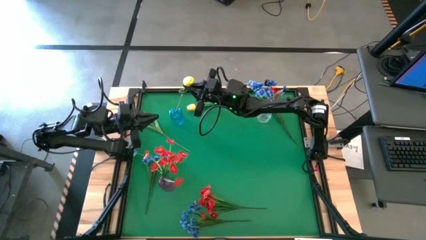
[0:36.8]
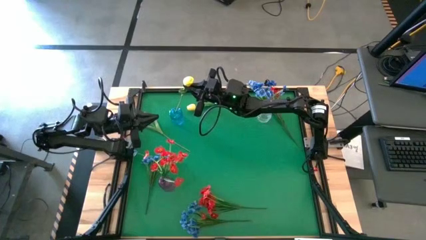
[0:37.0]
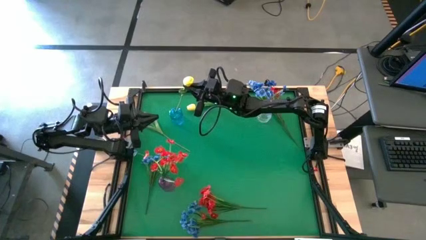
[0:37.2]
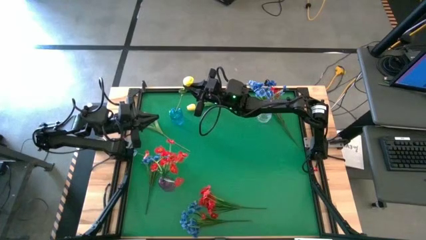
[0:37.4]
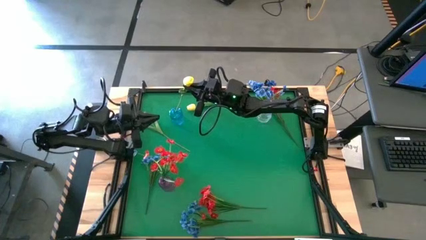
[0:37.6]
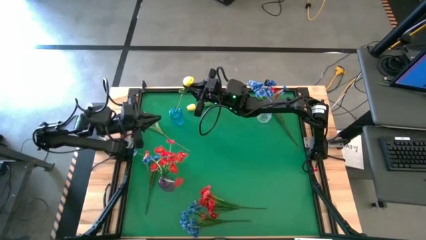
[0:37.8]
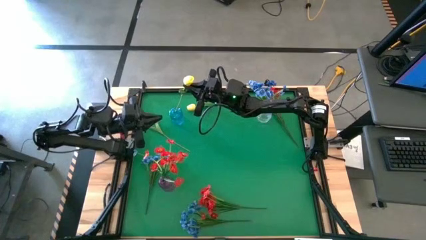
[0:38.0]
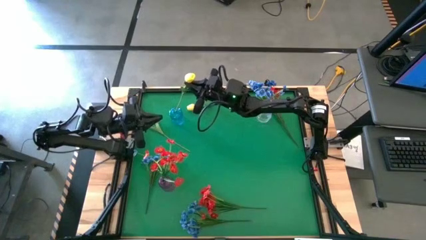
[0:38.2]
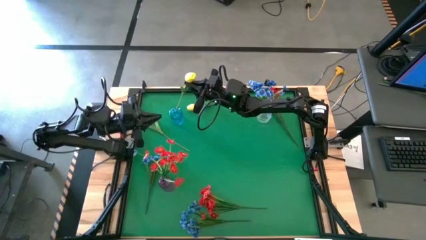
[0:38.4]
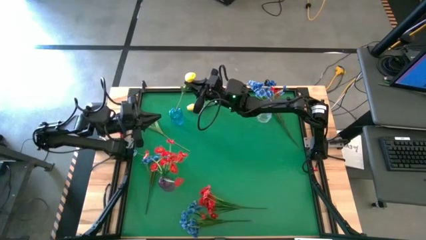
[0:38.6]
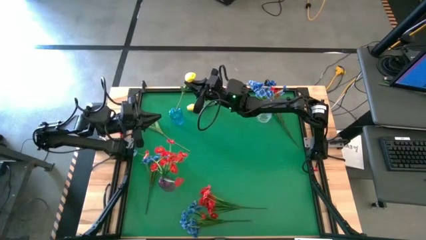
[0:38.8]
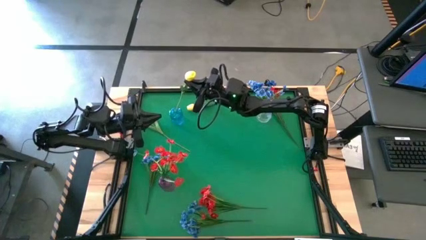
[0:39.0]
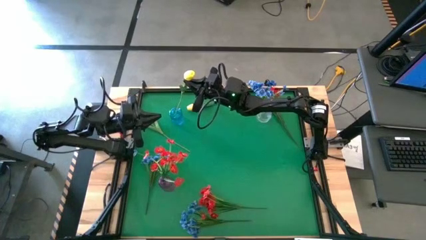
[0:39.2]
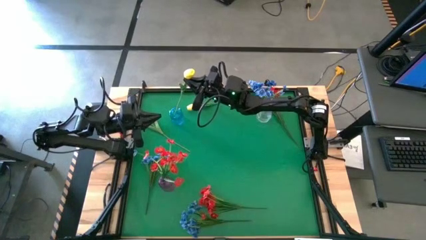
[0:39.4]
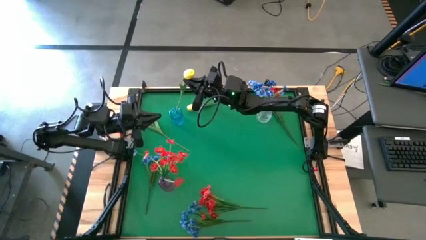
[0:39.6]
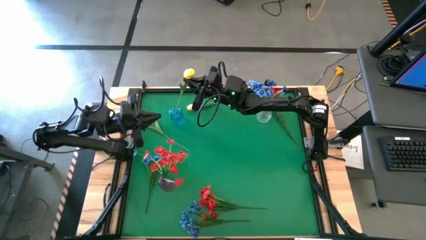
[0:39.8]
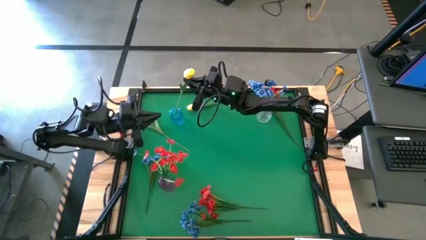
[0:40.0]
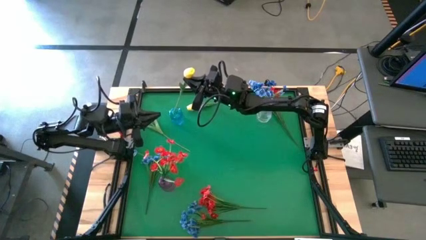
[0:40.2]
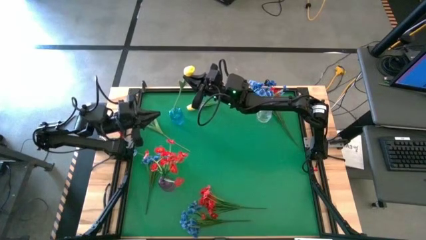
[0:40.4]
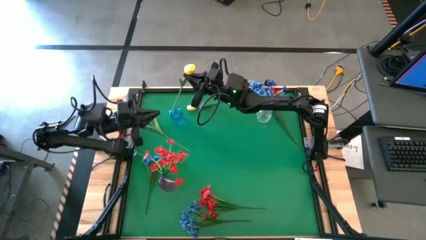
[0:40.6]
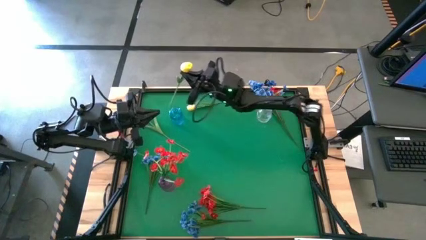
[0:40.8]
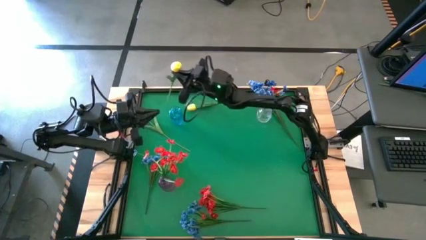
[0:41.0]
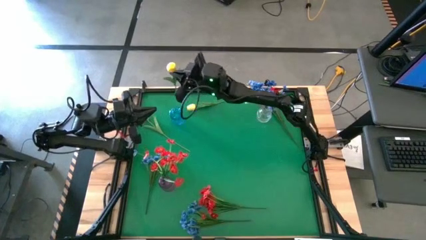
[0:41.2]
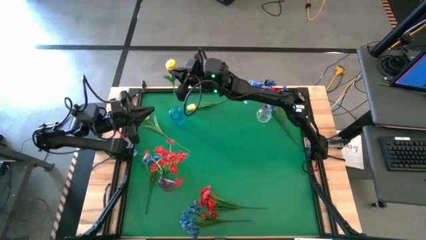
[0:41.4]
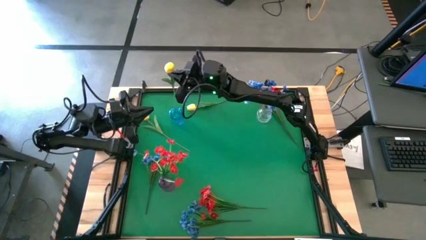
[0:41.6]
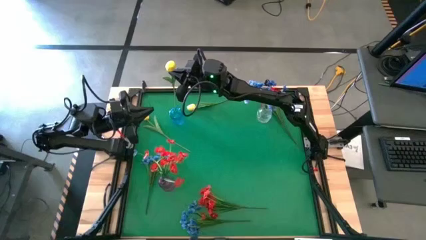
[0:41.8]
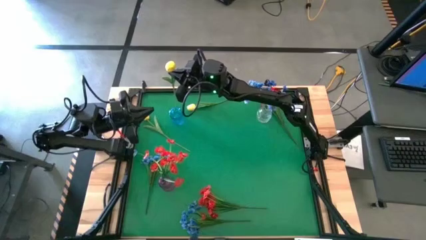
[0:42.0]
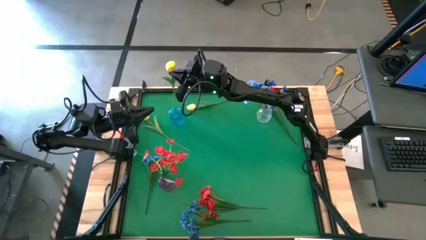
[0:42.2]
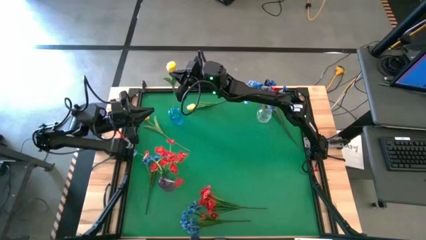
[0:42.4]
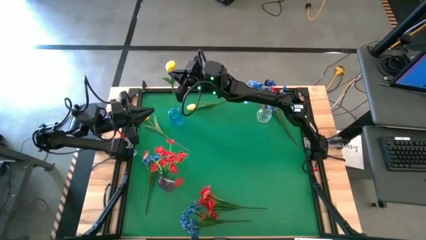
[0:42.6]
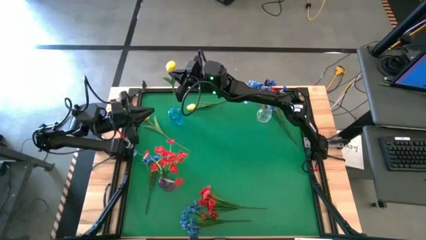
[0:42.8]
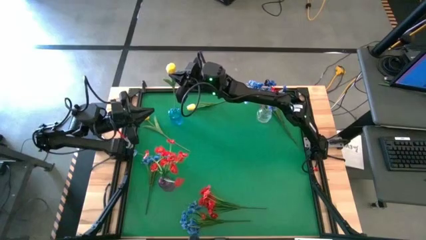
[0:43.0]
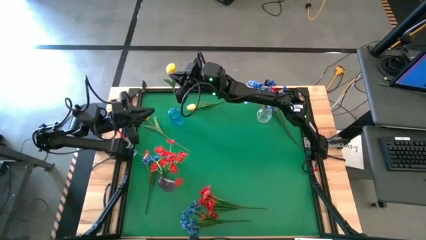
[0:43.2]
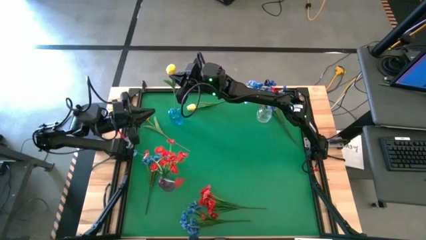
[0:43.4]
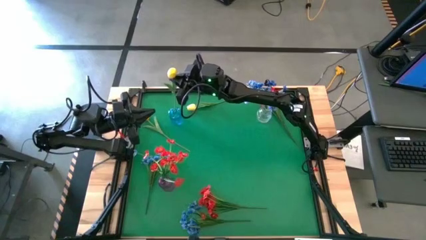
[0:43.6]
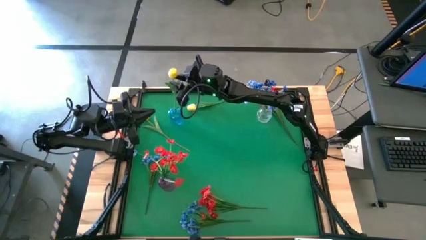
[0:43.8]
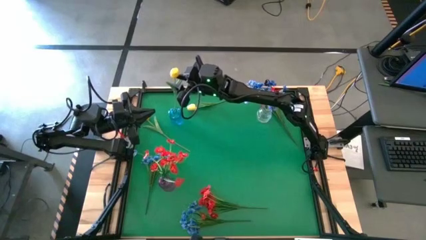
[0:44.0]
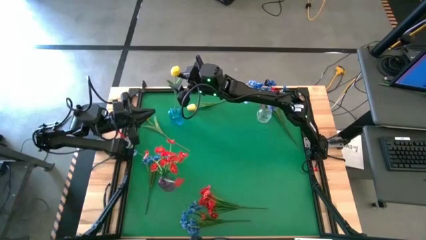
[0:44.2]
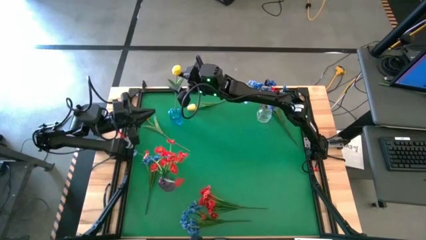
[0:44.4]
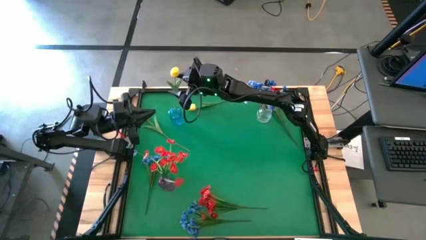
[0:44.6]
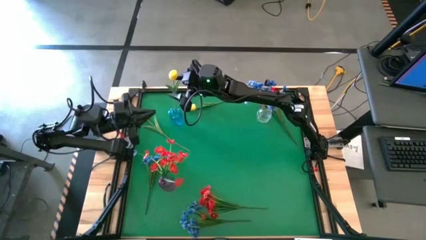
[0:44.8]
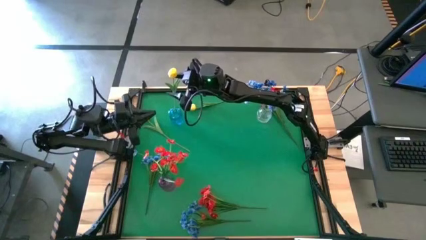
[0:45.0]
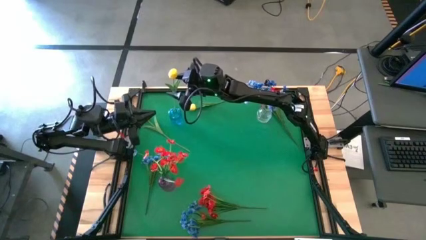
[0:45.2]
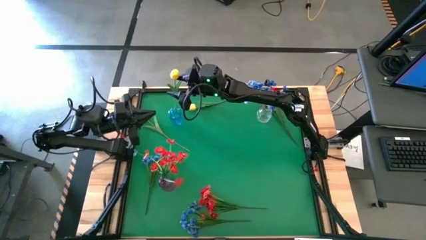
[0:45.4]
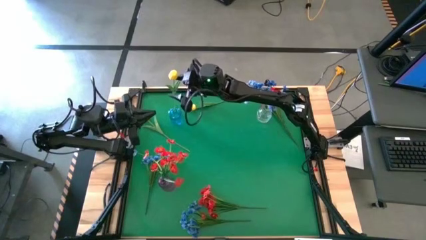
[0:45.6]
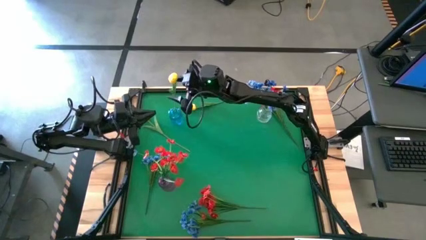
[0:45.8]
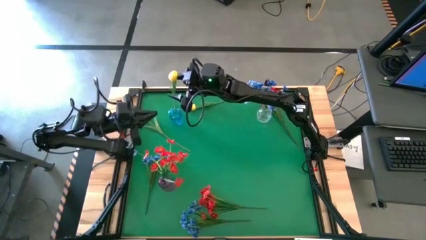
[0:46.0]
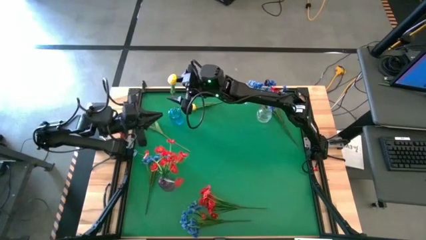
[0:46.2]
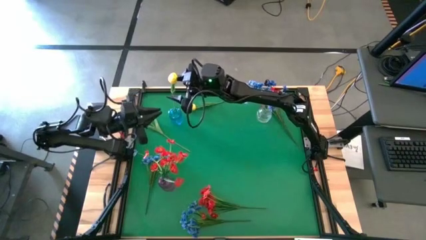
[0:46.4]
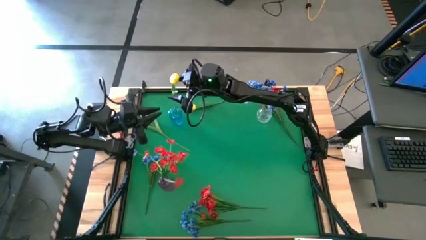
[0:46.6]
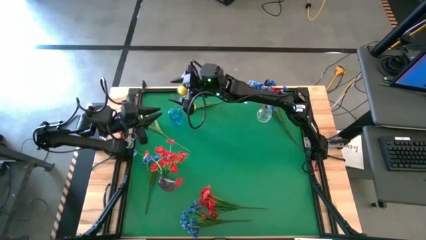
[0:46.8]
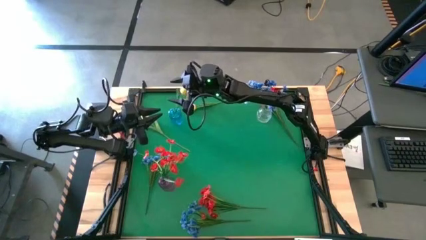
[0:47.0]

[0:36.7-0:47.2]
Task: Sort flowers into vase by color
Put the yellow tulip into the blue vase

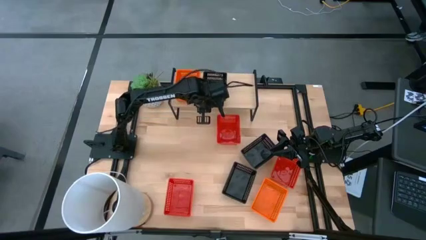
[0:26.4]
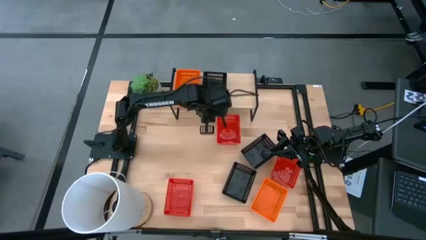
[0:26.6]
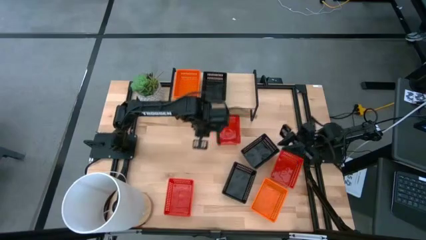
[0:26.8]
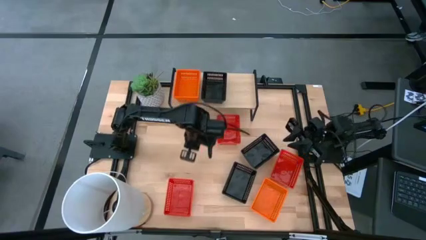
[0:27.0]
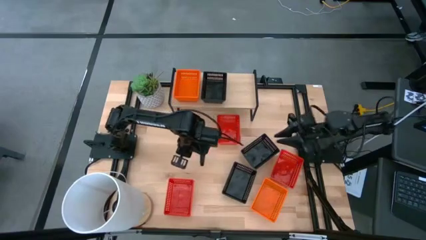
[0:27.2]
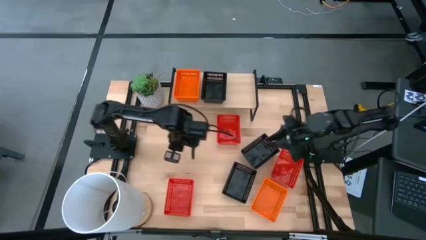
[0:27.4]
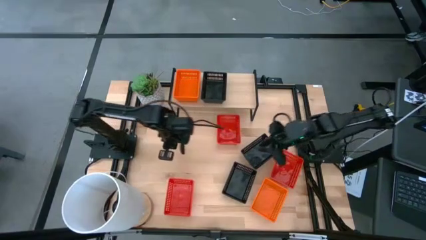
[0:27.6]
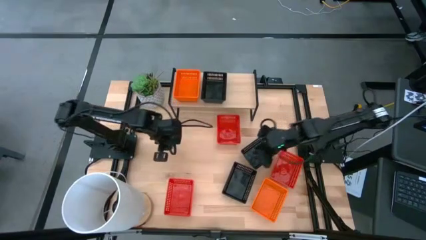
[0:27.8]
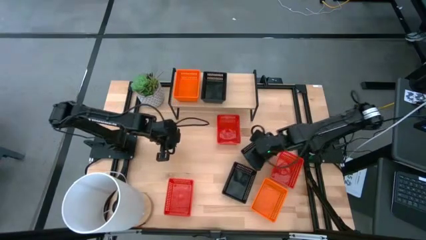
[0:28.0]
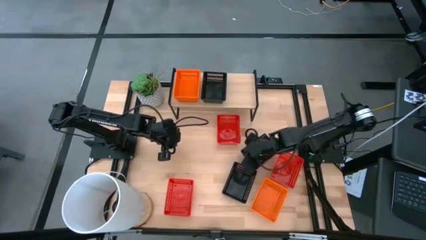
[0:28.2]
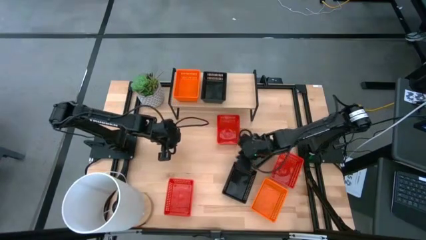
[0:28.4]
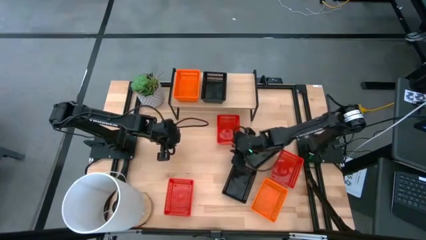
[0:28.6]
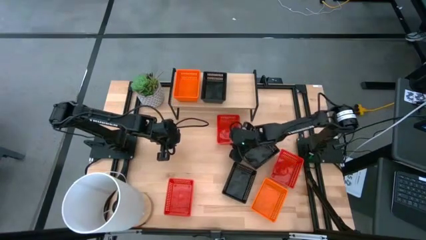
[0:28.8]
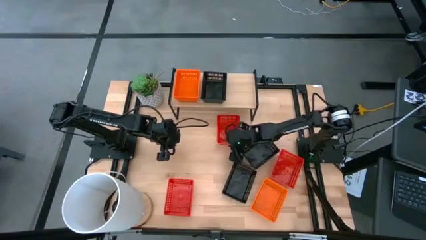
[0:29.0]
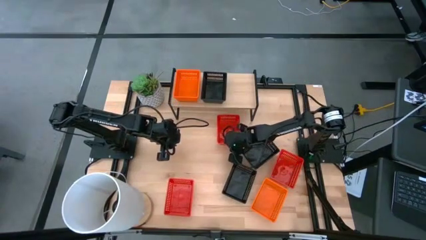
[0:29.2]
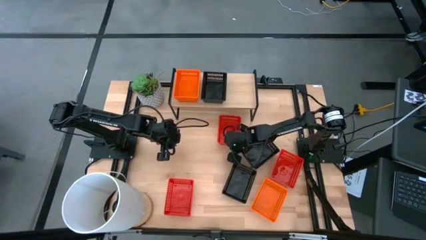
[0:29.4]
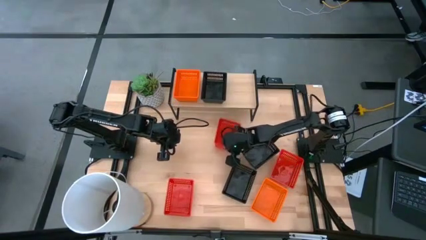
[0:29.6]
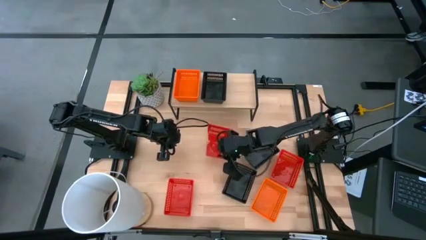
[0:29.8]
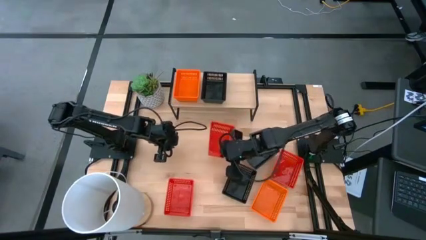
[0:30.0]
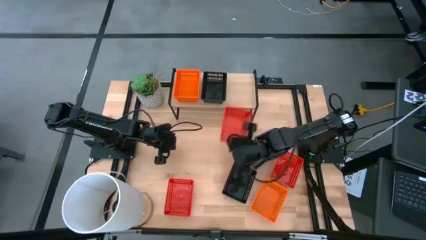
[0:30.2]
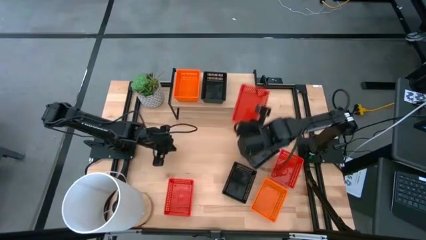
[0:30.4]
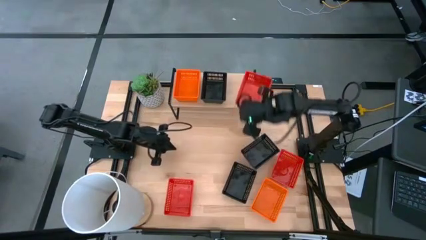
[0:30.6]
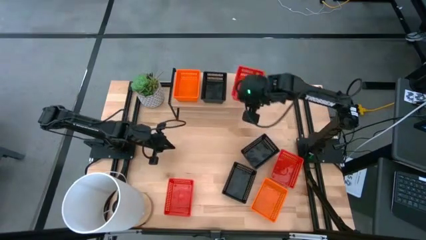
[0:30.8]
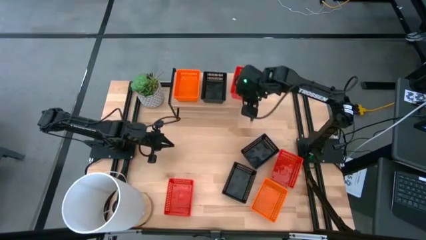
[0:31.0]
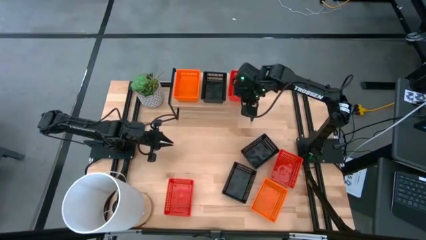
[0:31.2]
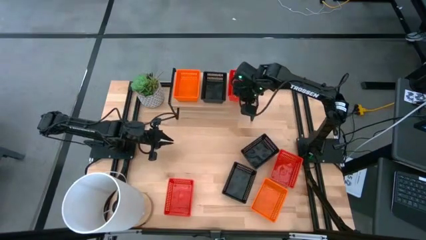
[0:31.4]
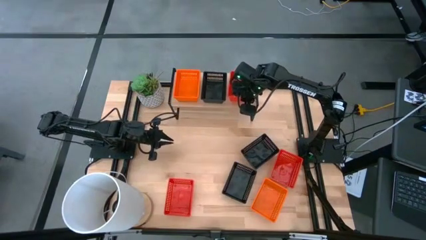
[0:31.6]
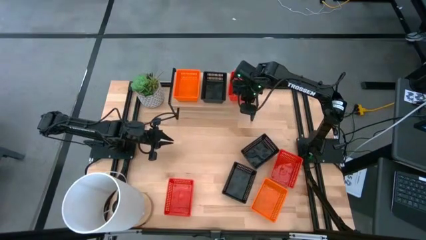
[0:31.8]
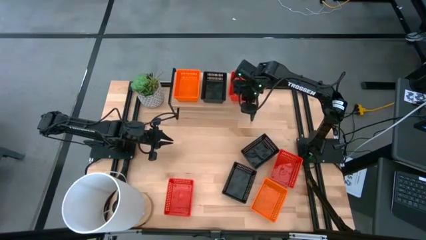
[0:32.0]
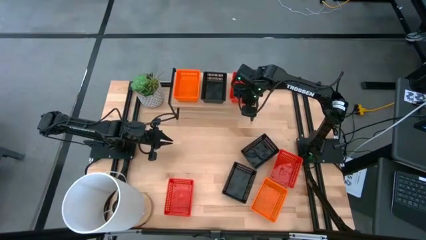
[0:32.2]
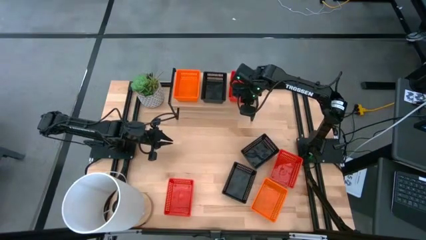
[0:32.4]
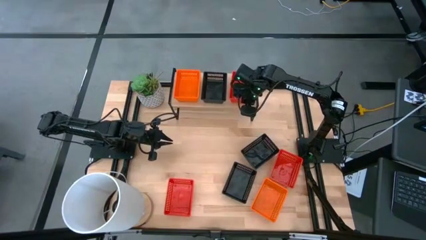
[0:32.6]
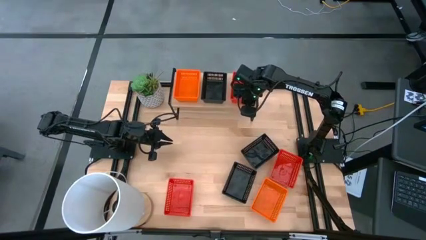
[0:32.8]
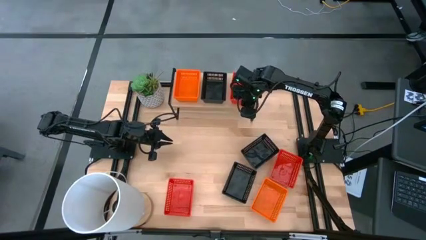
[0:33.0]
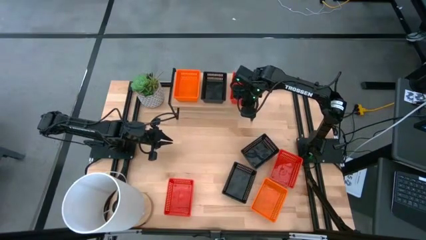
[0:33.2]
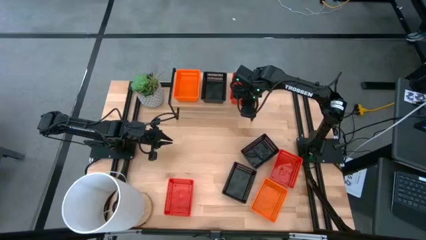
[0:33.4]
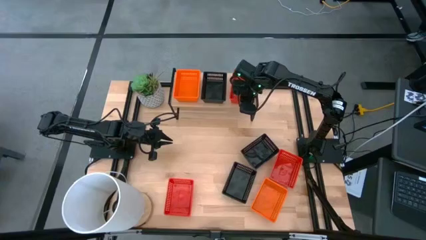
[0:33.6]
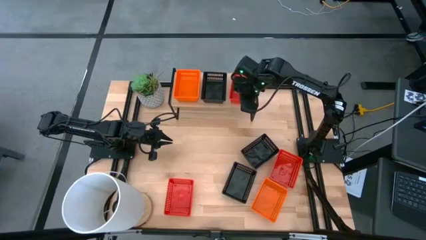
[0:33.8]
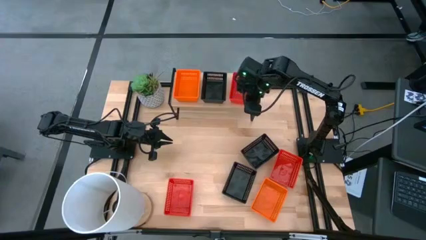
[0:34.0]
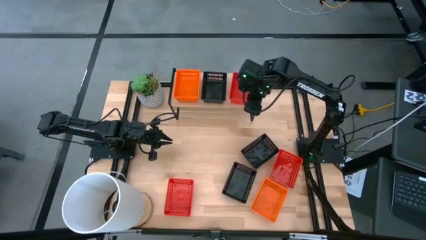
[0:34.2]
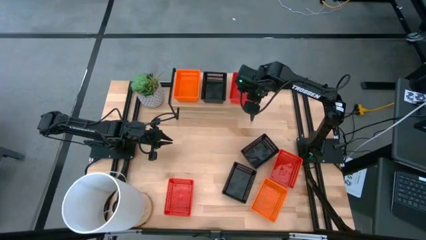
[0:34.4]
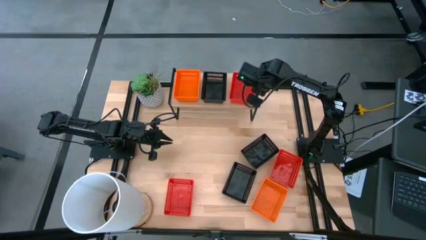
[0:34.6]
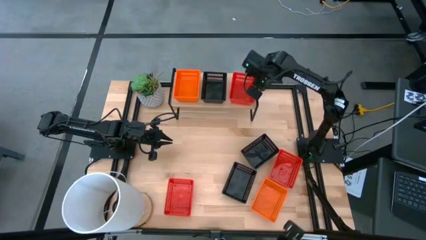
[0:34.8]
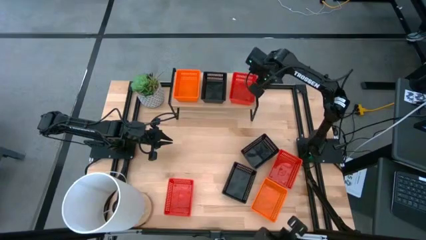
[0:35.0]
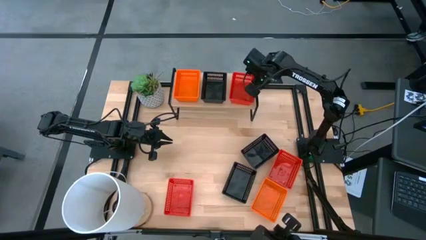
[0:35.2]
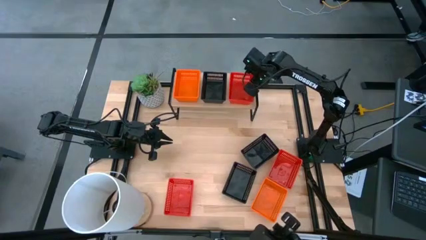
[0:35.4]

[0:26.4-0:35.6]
Task: Stack baskets on shelf by color
Put the top red bin on the shelf
